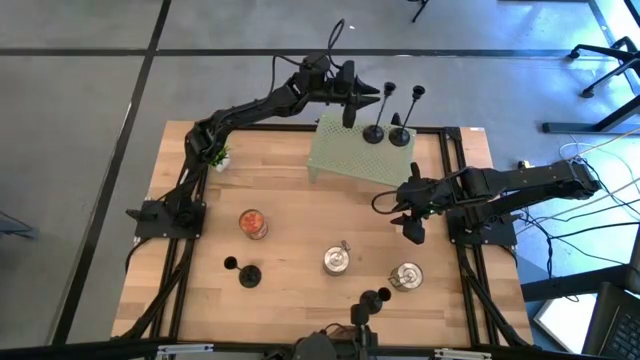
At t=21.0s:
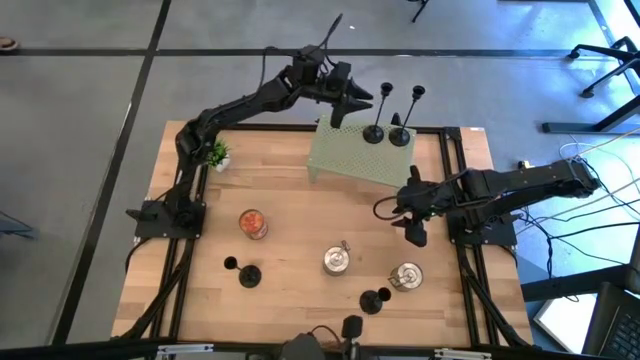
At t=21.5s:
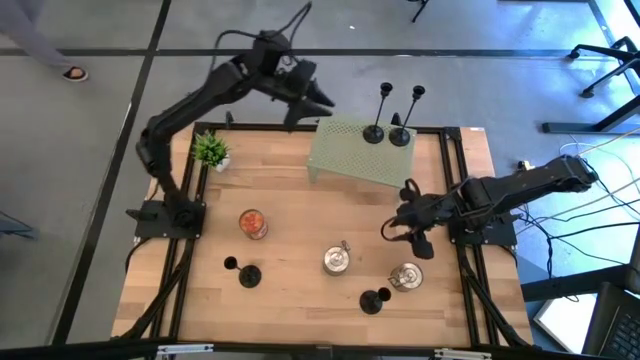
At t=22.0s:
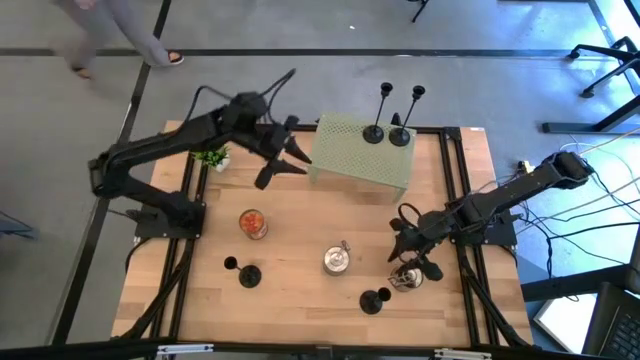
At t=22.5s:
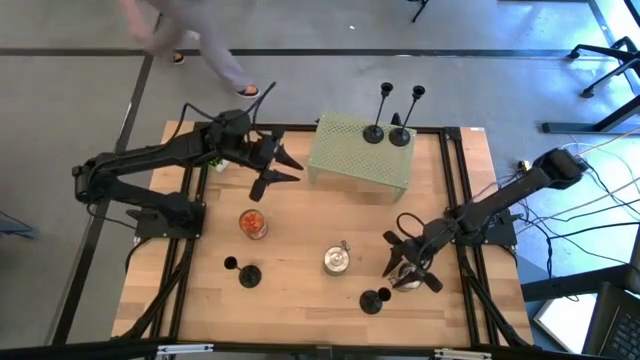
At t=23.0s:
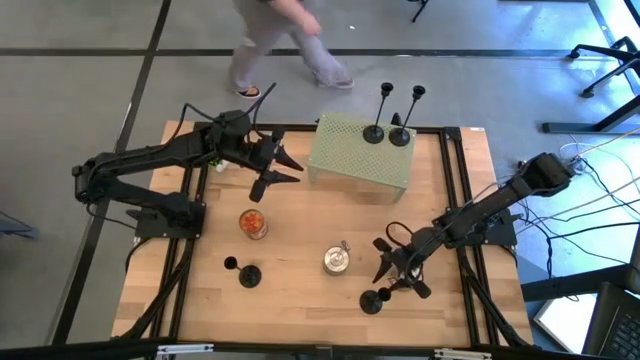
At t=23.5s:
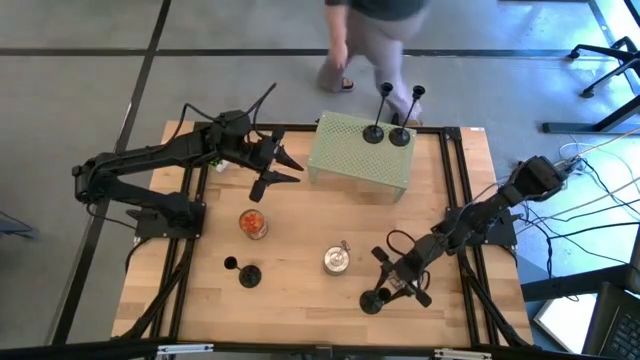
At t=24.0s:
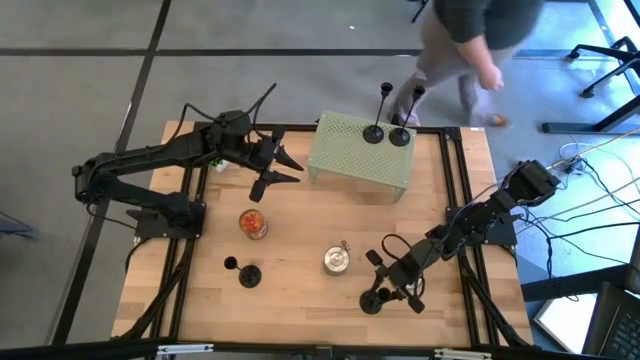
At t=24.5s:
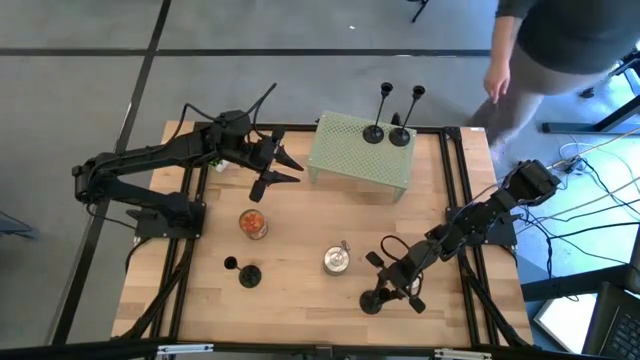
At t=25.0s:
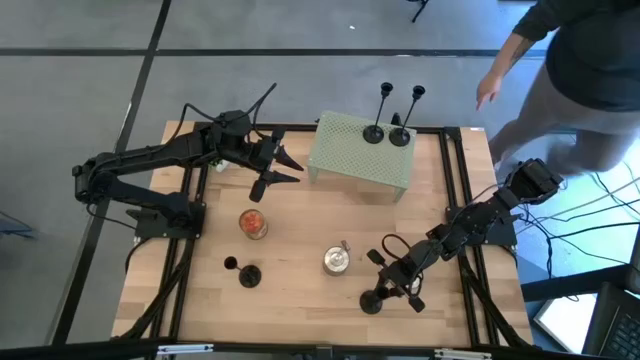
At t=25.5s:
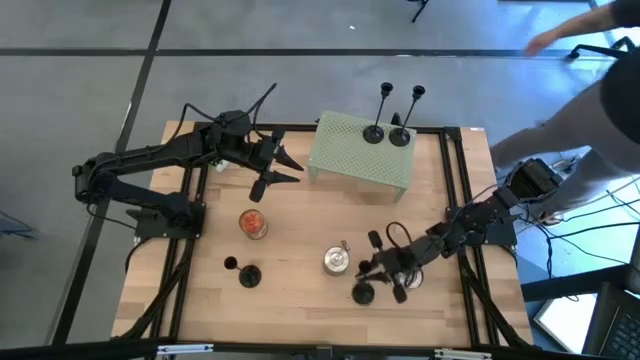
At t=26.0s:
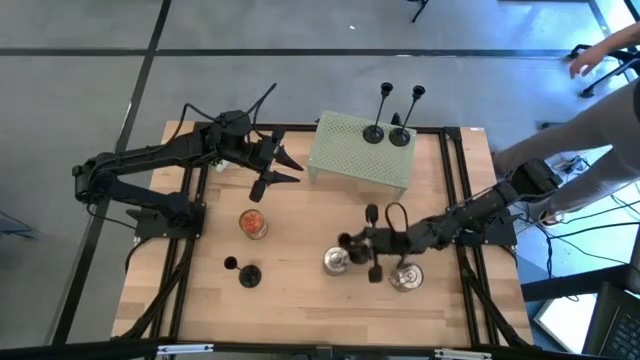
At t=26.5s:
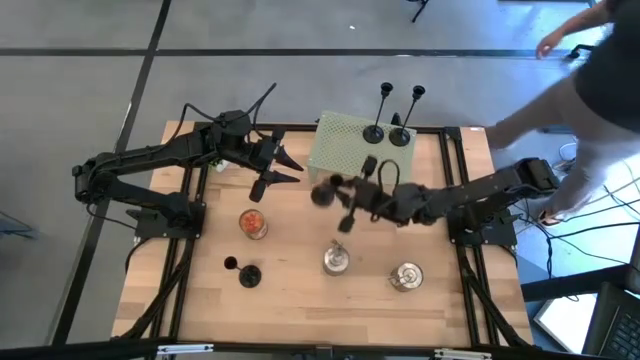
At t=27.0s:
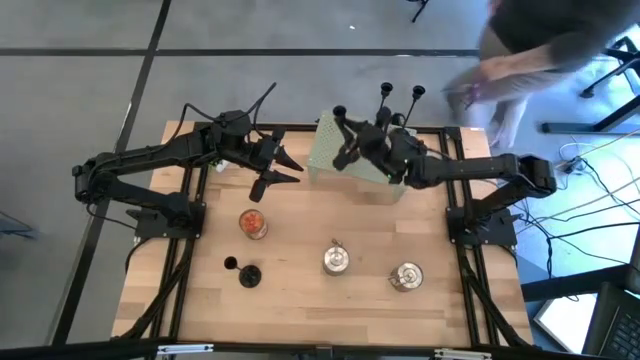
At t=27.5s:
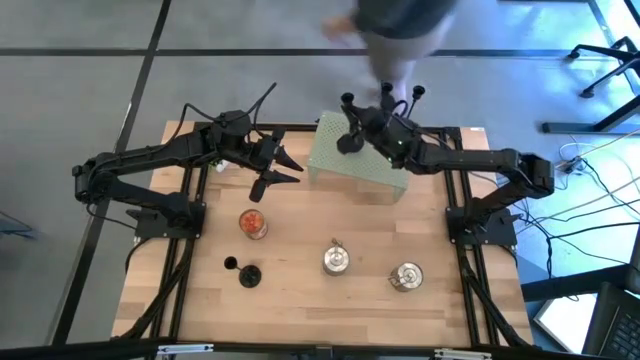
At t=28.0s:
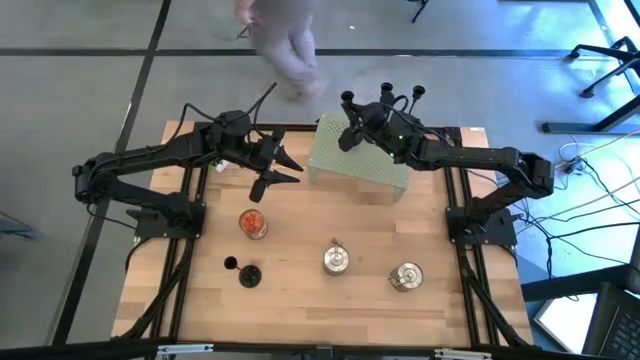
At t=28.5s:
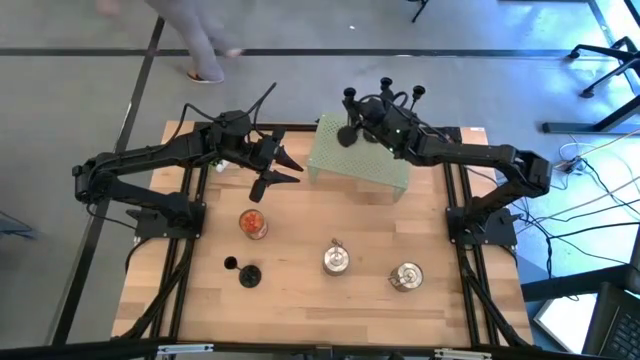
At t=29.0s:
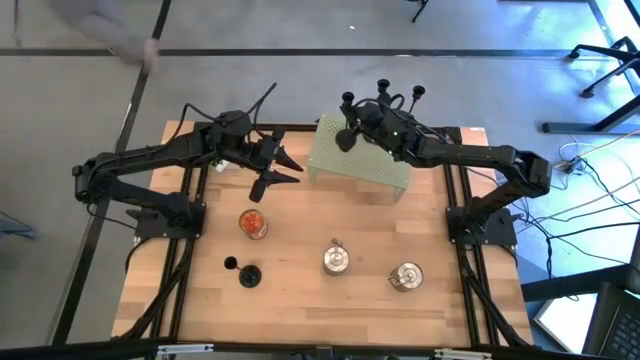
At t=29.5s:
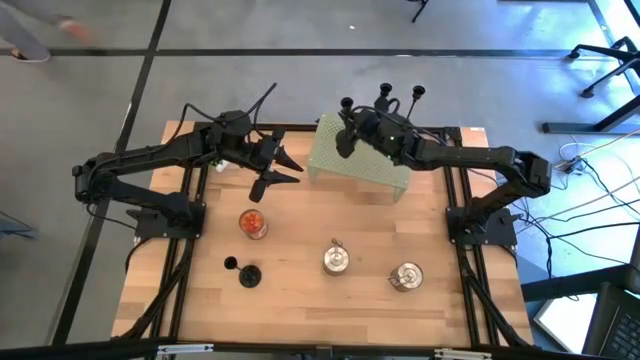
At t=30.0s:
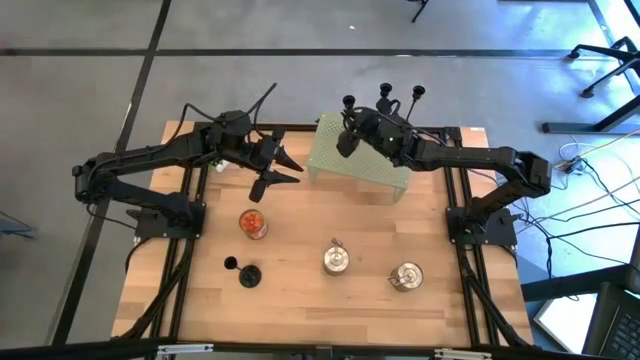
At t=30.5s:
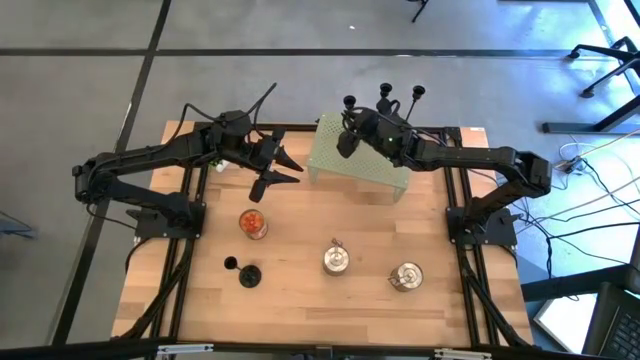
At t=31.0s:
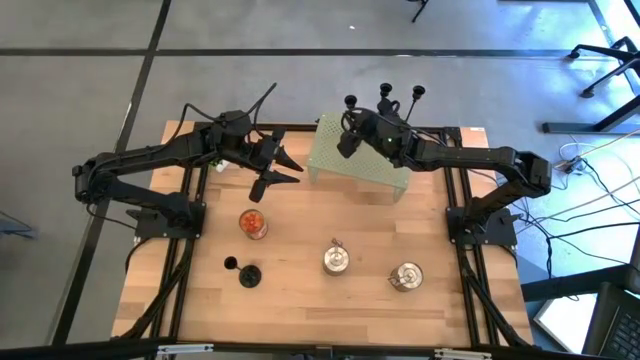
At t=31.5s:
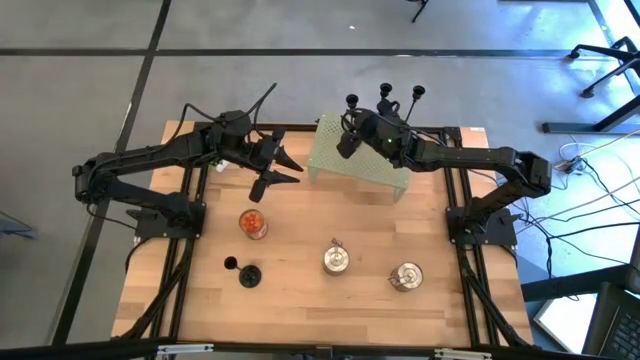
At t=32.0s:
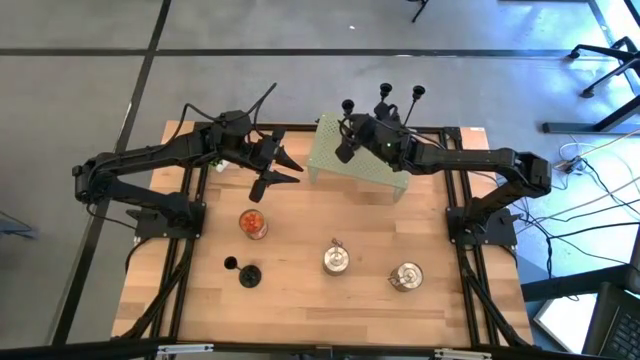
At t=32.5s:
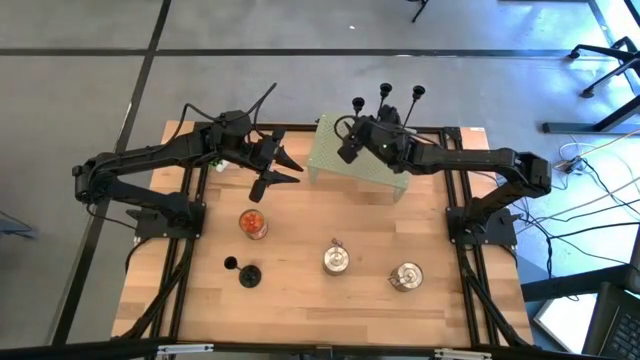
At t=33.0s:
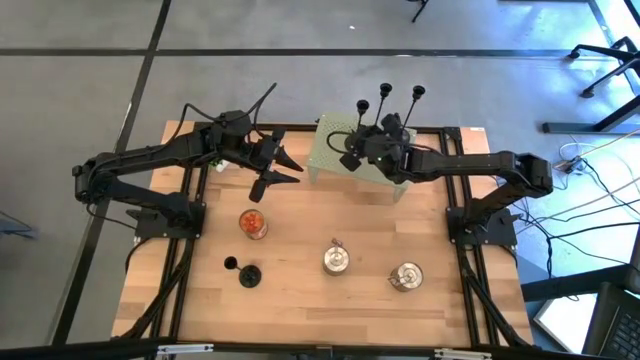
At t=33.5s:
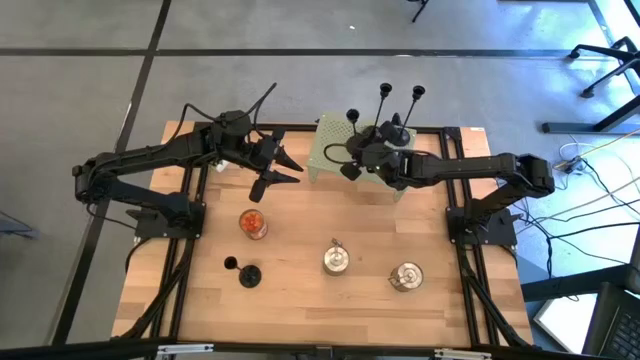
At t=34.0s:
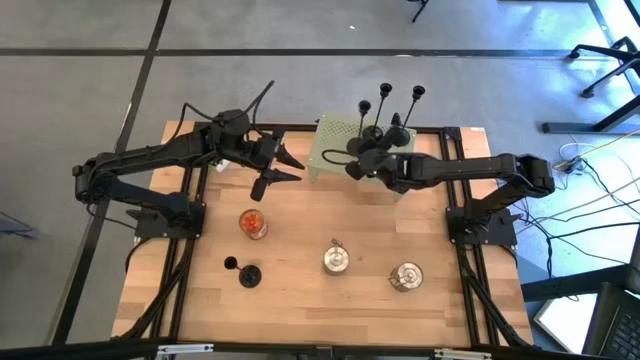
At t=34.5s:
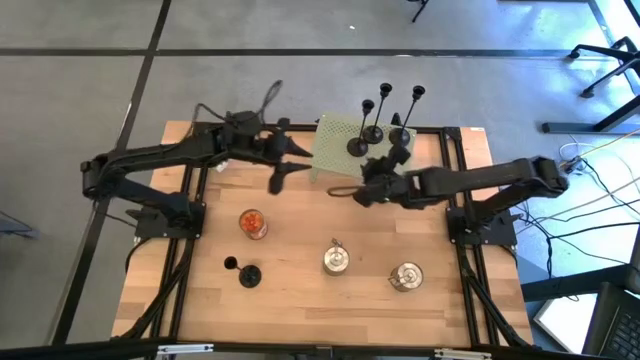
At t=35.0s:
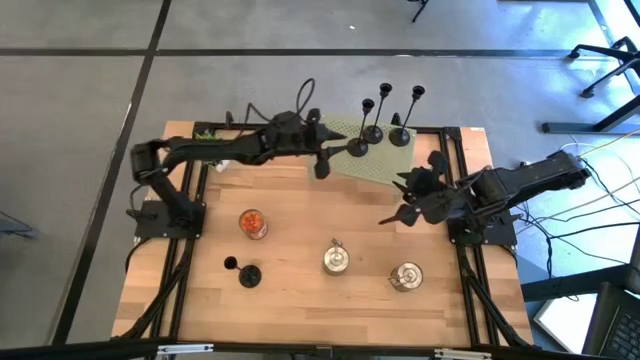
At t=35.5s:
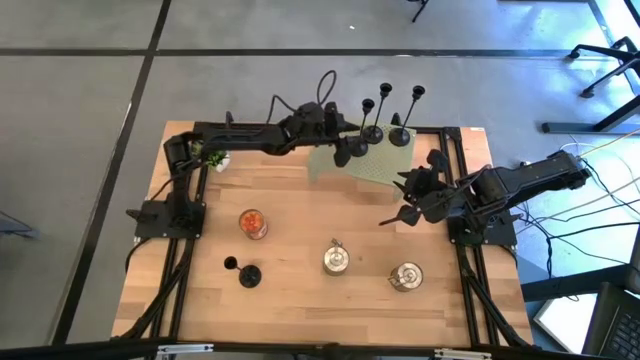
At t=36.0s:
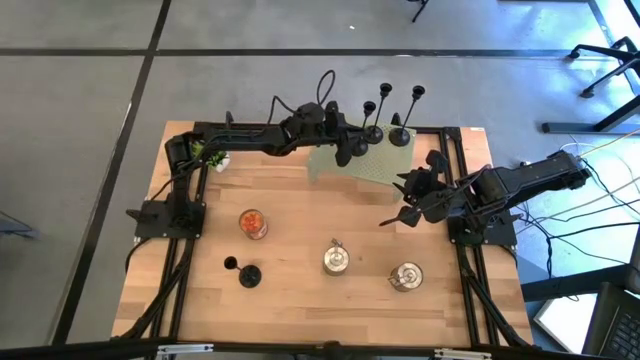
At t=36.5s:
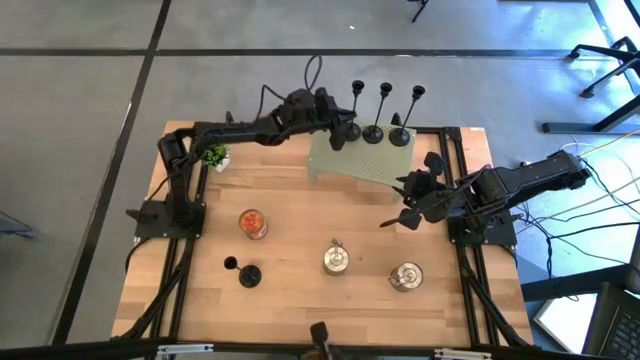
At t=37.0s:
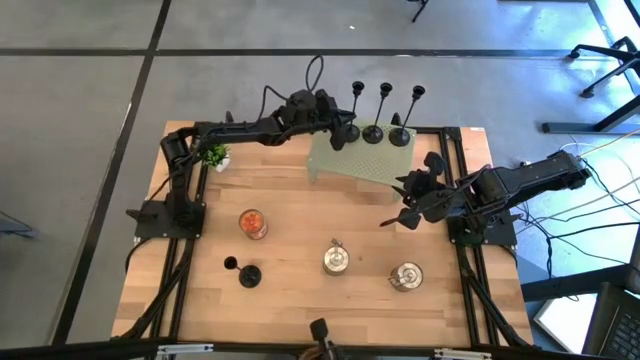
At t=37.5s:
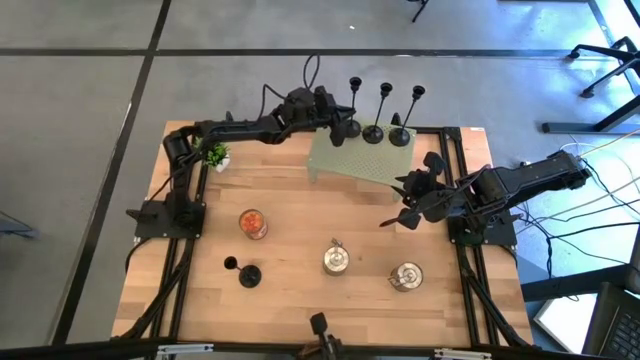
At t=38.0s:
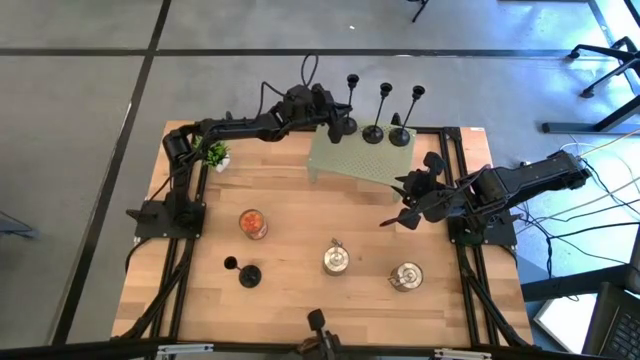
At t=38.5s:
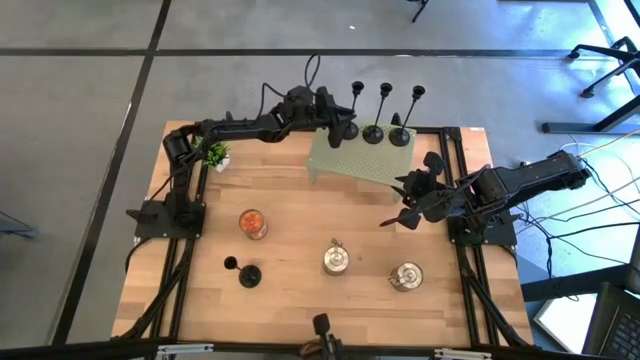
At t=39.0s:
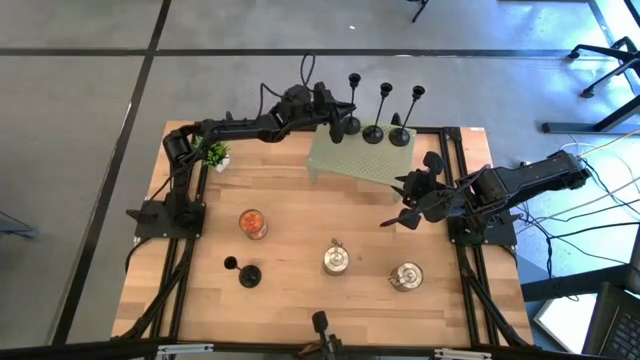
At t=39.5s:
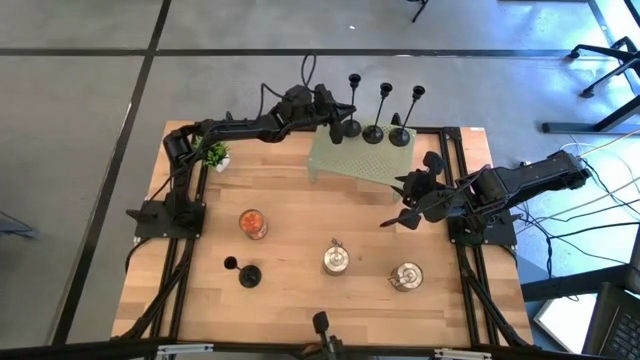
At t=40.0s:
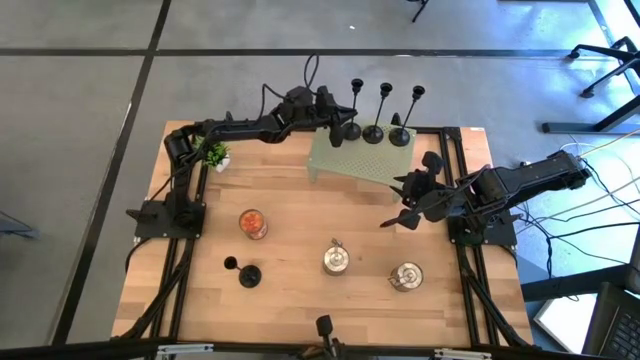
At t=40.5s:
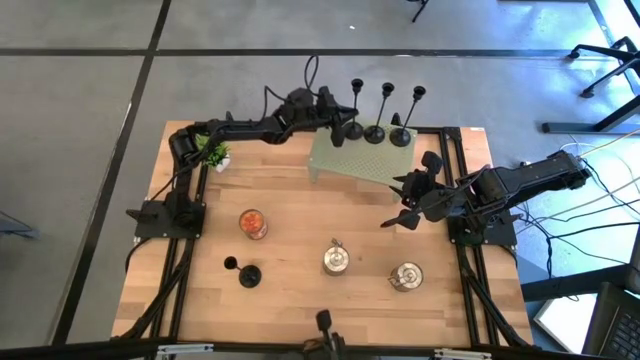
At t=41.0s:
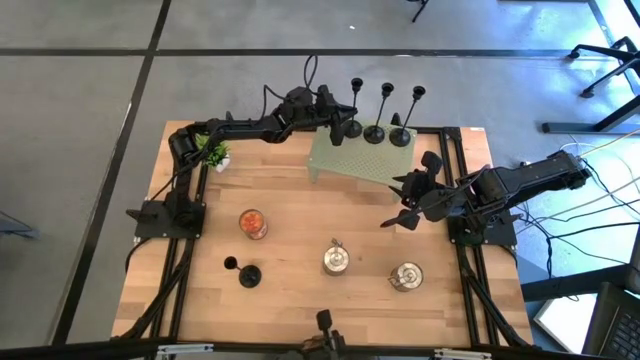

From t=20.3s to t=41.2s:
Task: Pick & Place candle stick holders
Put the right black candle holder on the shelf
